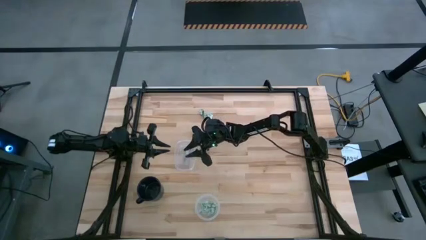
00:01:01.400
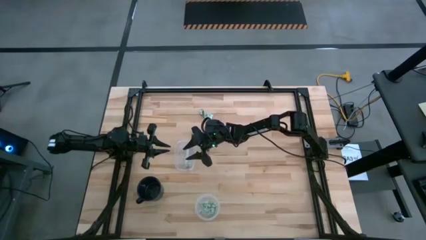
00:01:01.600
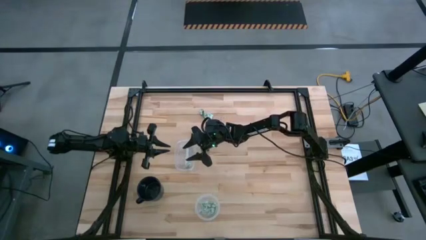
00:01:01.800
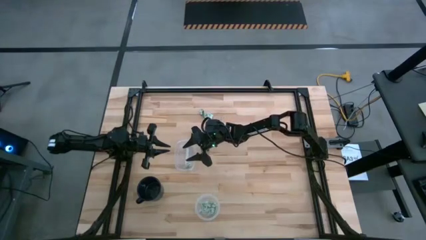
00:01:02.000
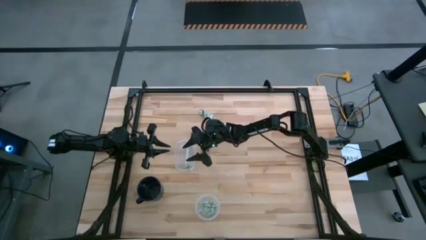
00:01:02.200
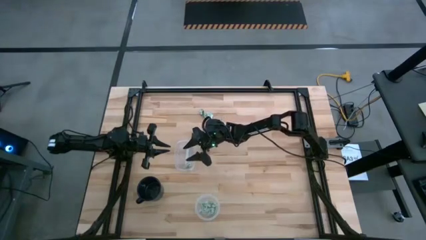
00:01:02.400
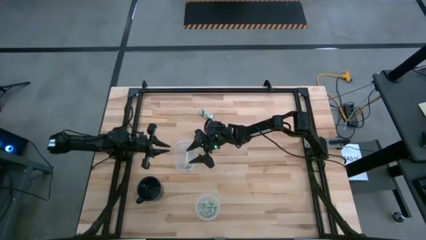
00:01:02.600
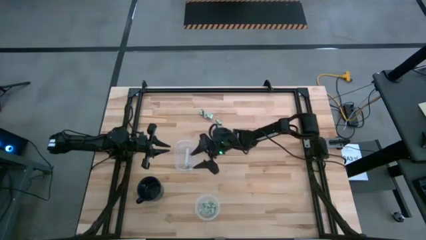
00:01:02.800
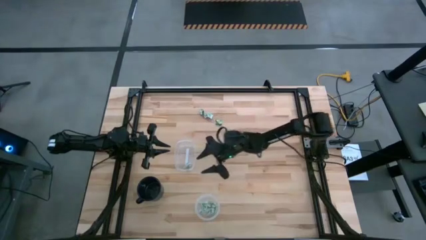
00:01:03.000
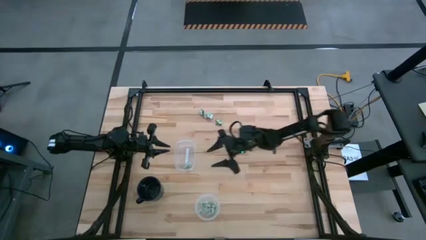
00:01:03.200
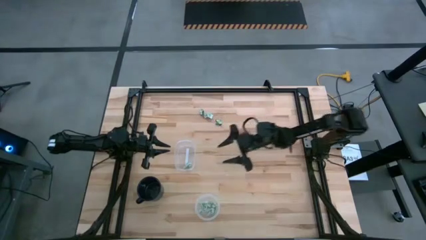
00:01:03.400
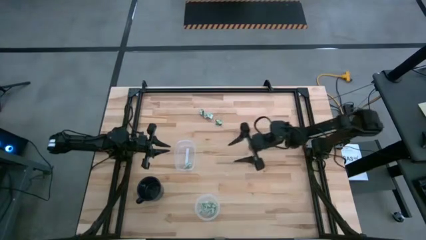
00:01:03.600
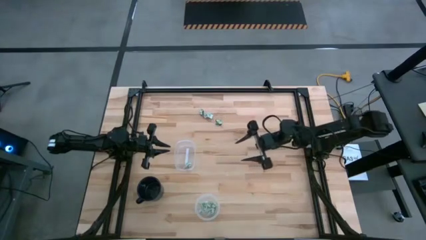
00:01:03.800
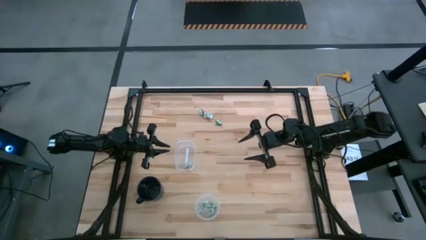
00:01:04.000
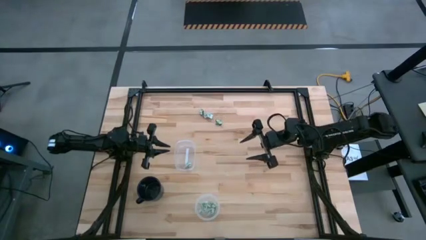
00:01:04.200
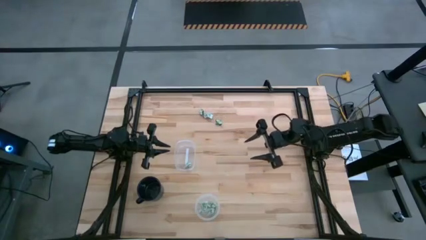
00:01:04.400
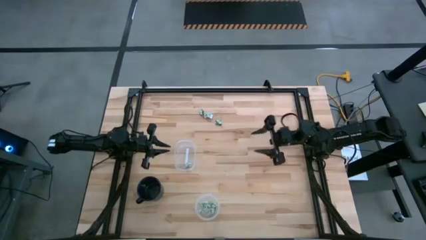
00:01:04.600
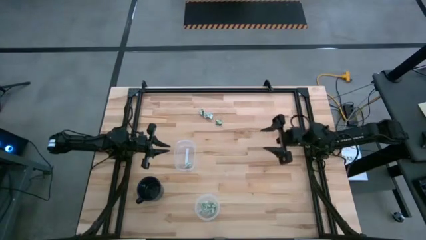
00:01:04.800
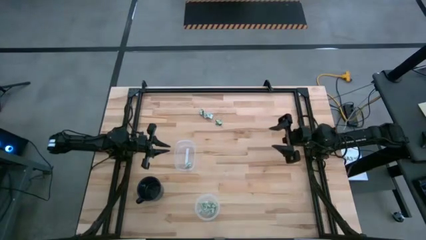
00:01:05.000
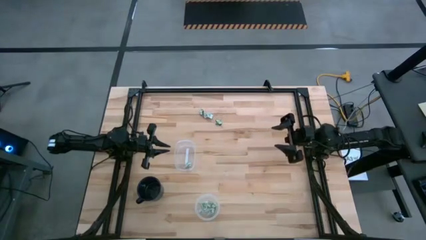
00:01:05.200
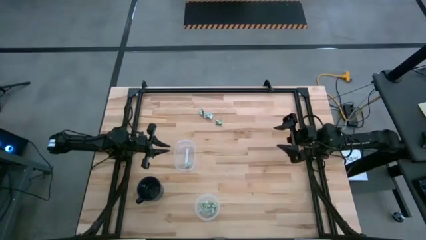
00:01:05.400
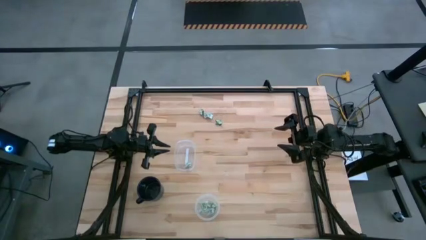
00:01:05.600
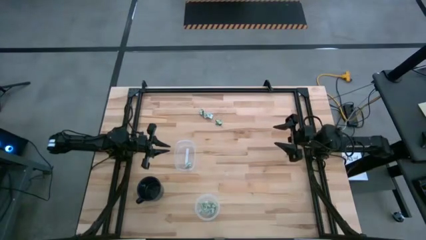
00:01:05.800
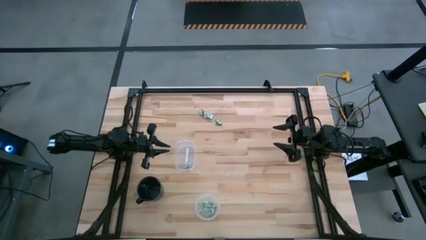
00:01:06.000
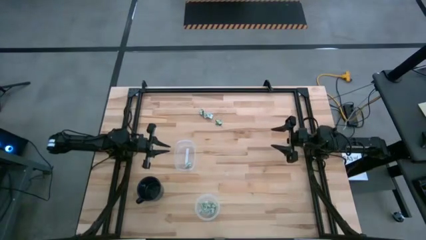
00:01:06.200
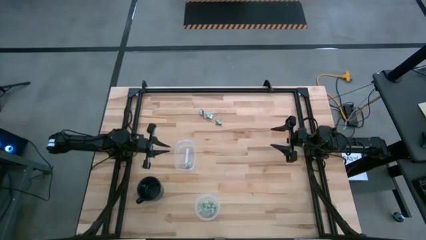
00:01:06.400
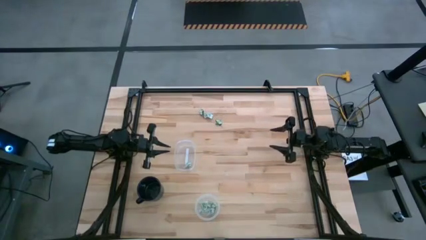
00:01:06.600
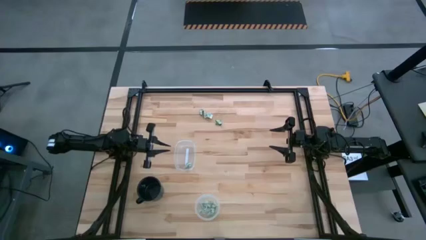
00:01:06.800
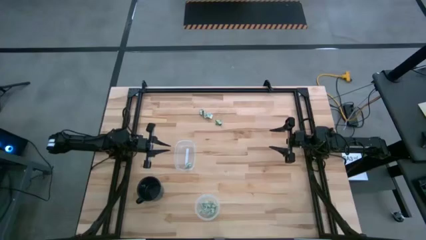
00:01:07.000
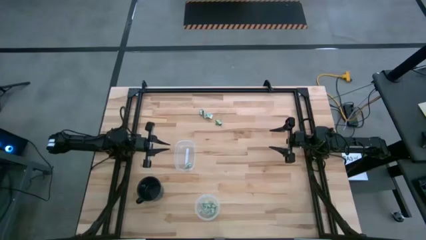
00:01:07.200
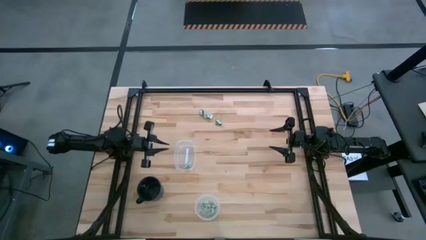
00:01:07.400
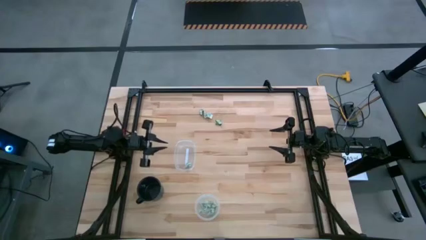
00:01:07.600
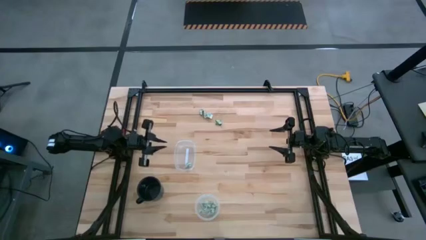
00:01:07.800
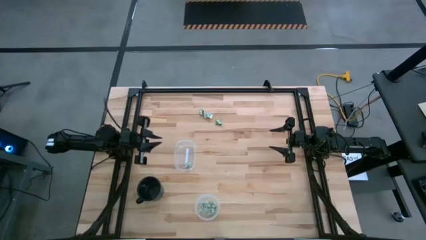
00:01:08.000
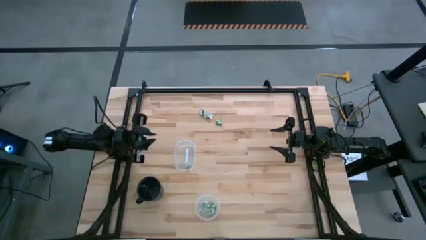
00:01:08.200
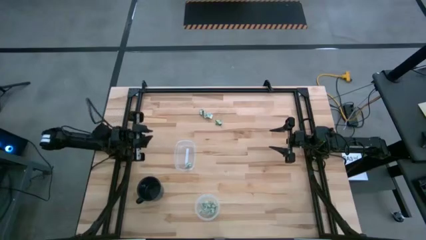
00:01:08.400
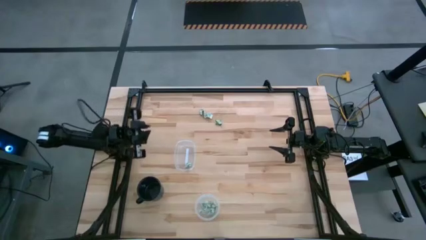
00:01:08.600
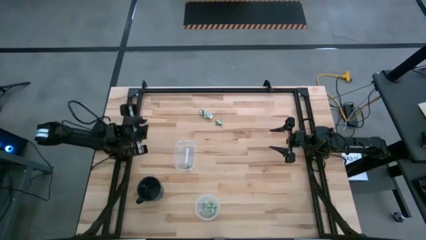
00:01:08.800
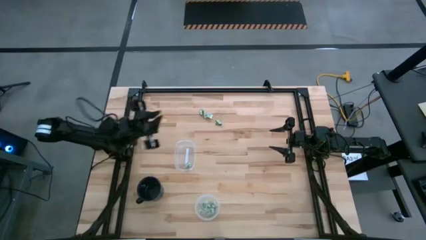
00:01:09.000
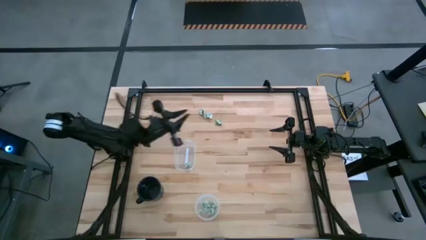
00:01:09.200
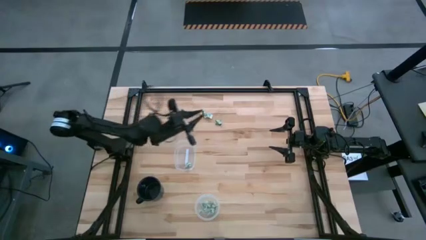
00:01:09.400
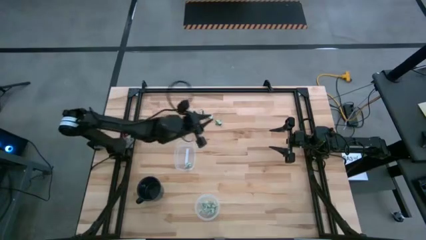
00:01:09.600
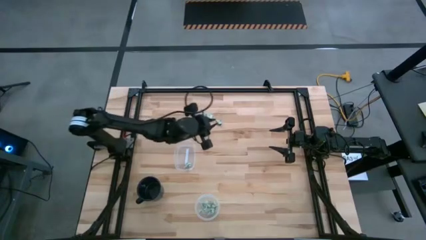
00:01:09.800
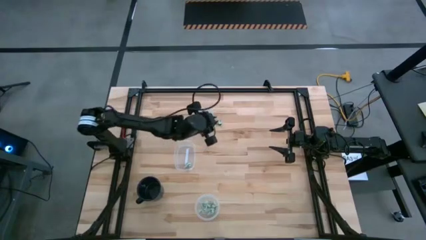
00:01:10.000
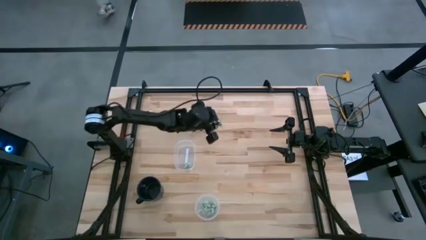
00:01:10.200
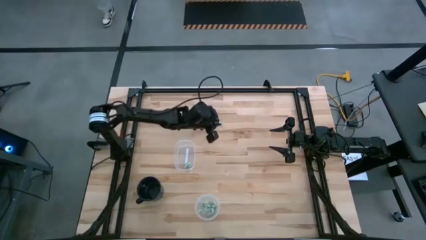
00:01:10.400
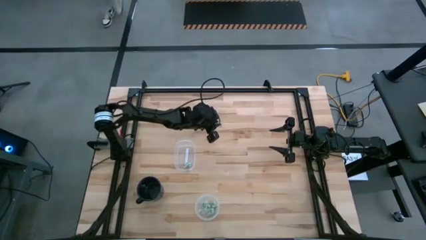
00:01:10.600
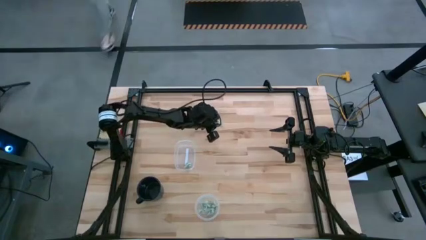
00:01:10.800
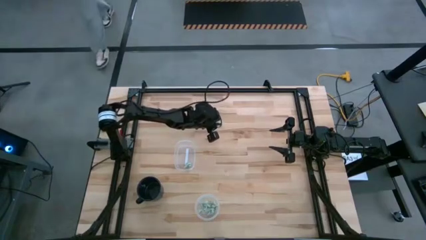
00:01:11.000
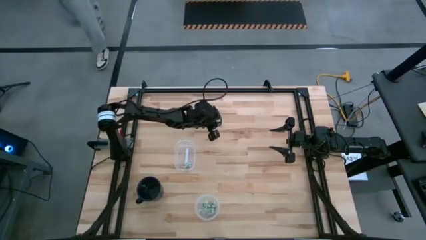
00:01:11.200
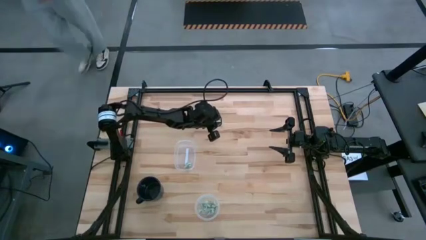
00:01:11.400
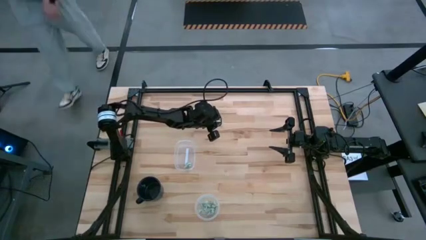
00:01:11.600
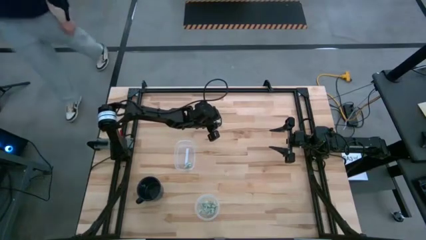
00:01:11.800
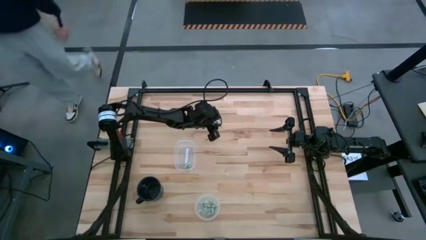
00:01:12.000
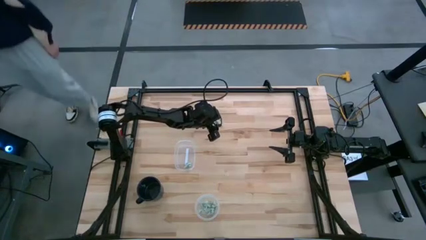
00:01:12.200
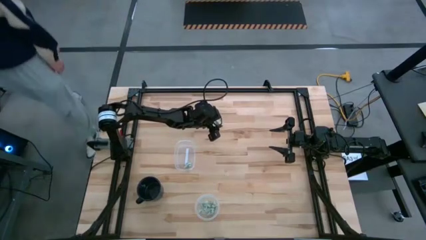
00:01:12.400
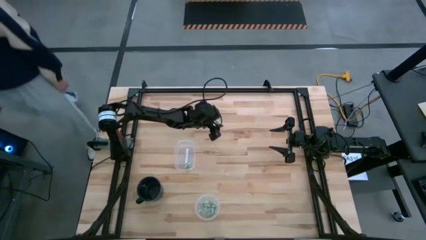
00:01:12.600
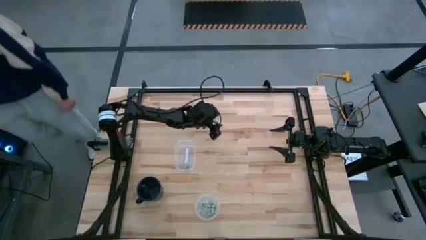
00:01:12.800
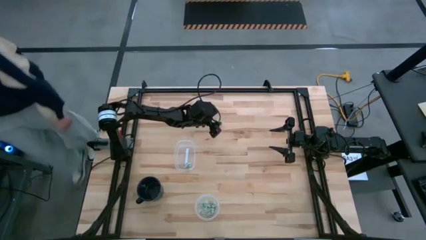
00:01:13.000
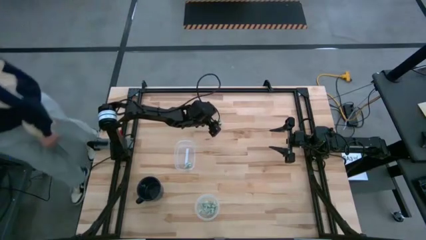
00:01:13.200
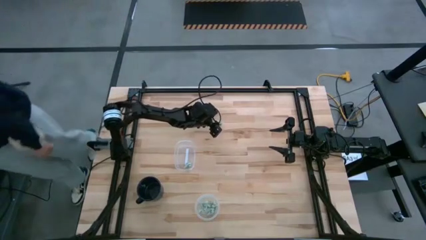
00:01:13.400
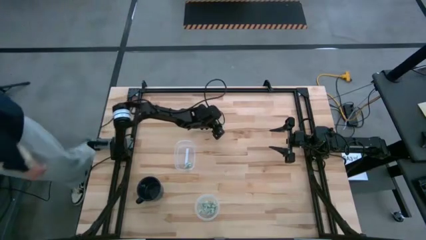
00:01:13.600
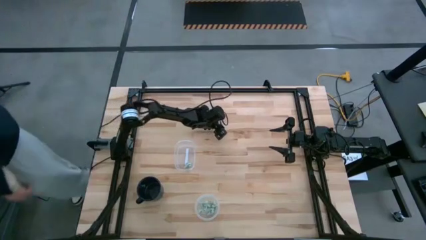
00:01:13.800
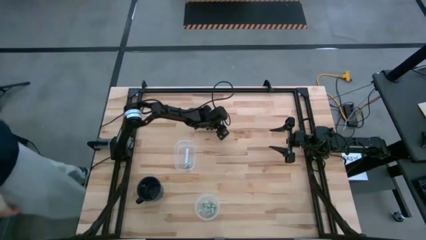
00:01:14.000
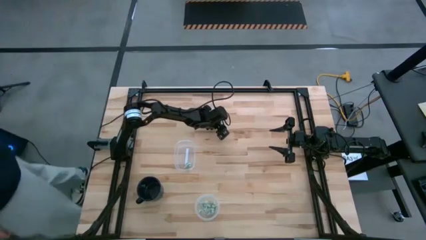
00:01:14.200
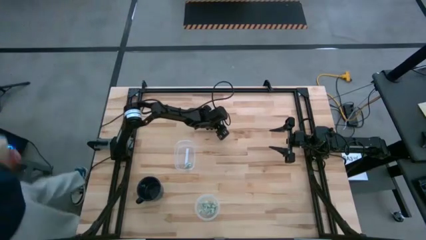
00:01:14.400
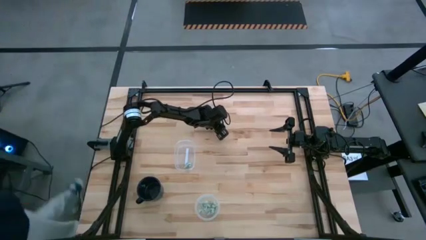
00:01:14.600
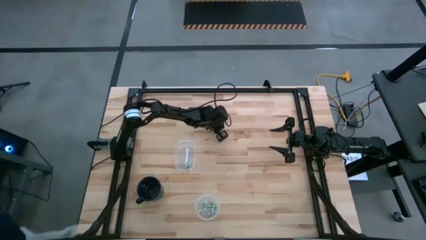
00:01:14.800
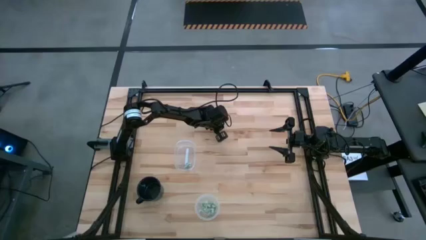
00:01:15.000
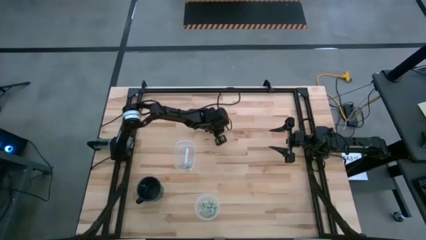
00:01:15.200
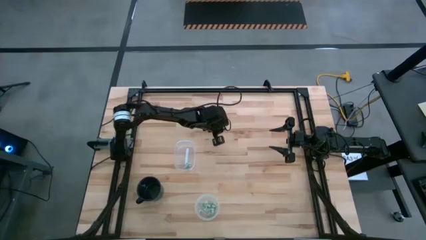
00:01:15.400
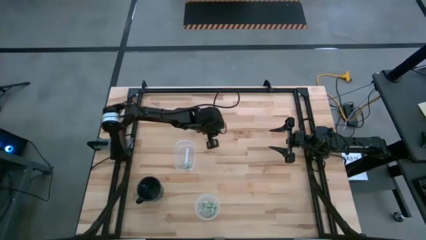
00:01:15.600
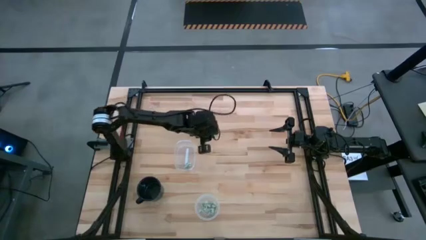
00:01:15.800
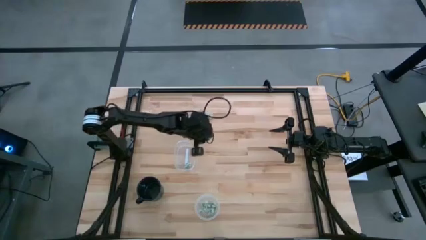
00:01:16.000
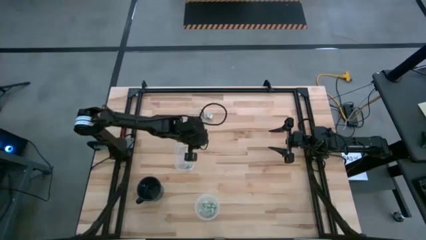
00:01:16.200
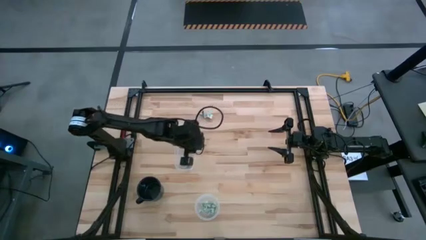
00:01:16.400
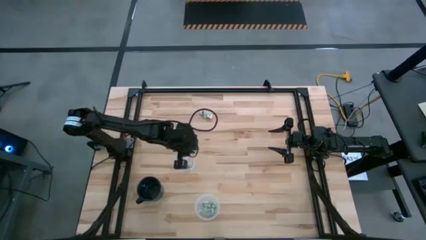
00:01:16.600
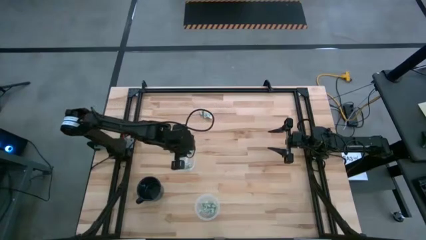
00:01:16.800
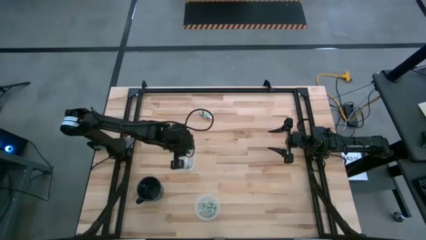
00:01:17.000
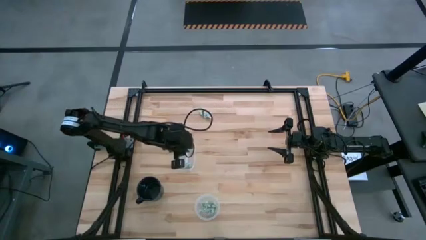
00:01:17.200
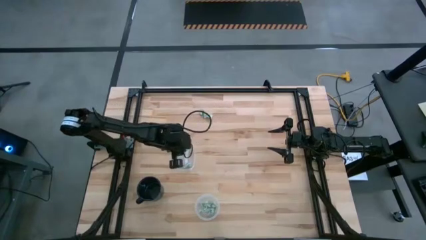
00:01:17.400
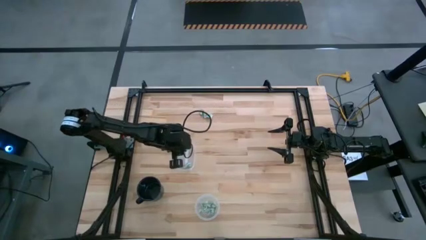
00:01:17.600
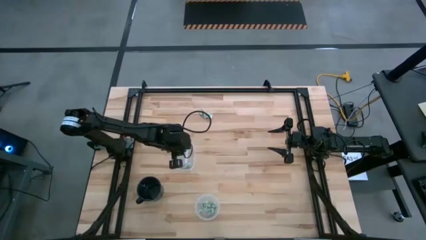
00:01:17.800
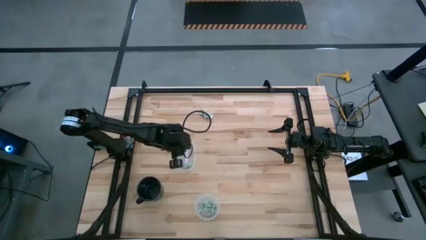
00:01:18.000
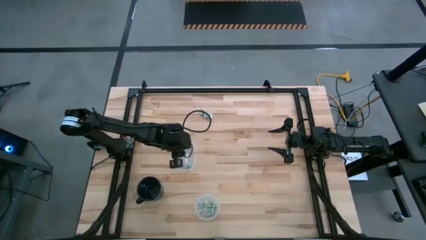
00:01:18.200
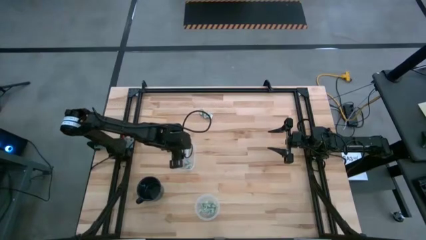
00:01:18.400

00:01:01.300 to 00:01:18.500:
Task: Pick and place Stevia / Truvia into bins
Put the truvia packet into the oval transparent container
